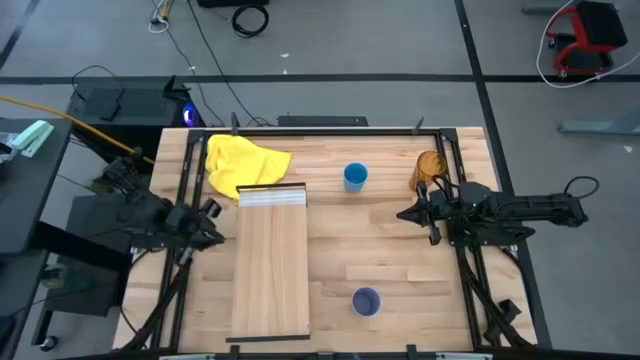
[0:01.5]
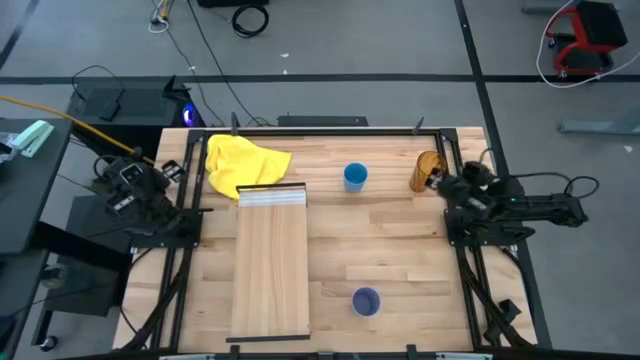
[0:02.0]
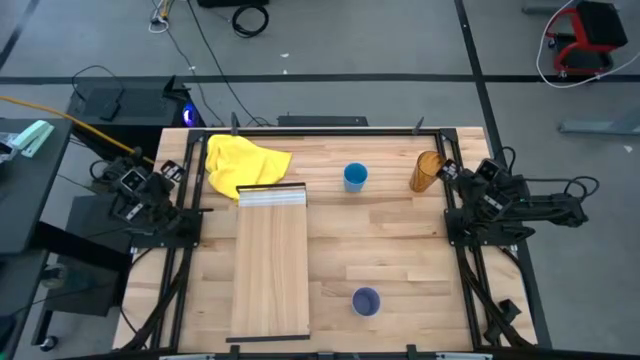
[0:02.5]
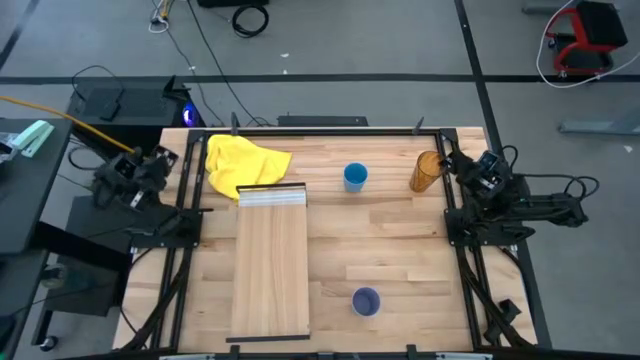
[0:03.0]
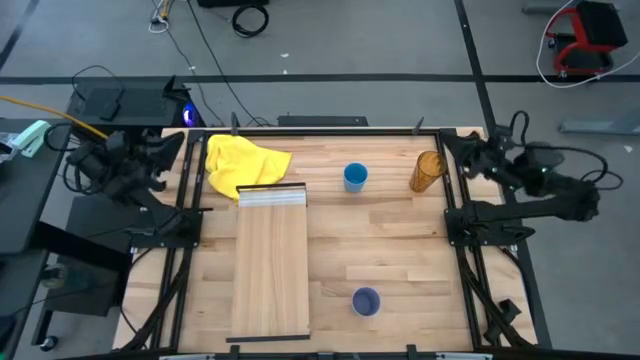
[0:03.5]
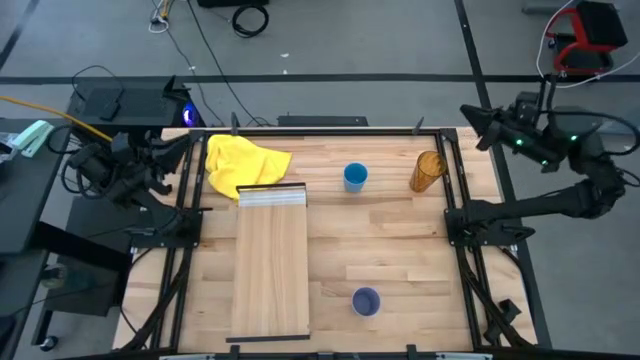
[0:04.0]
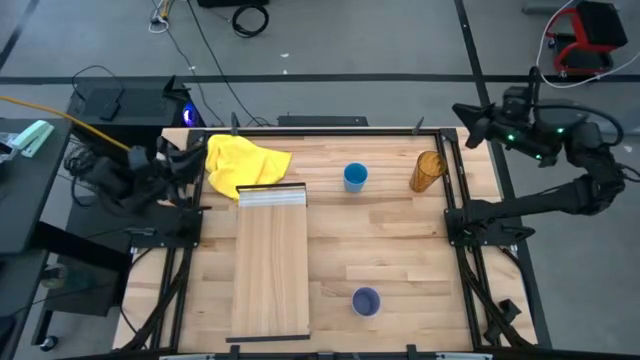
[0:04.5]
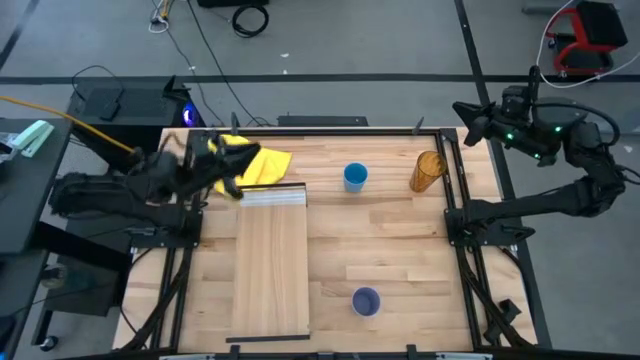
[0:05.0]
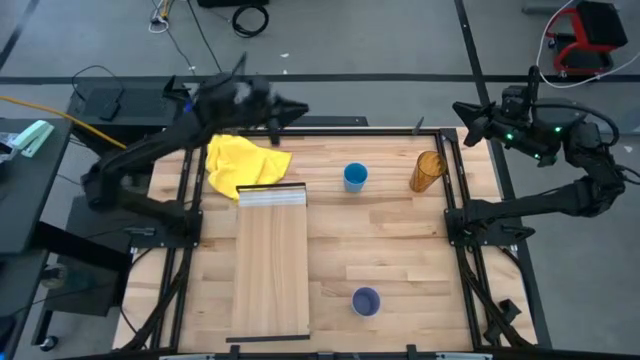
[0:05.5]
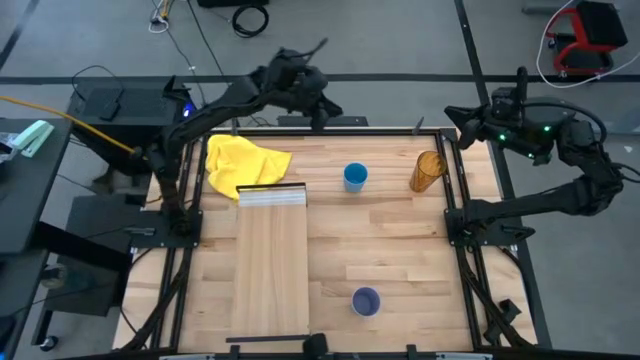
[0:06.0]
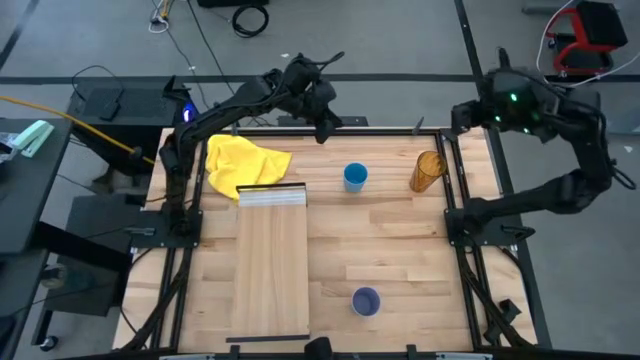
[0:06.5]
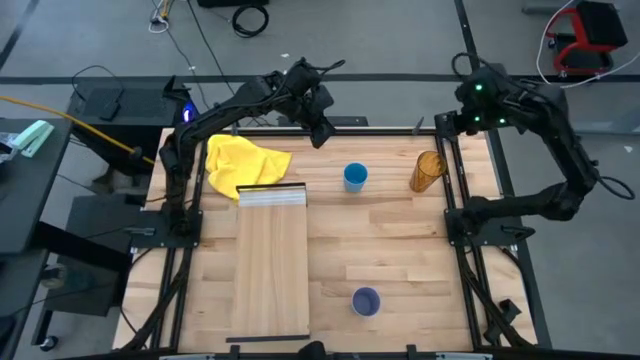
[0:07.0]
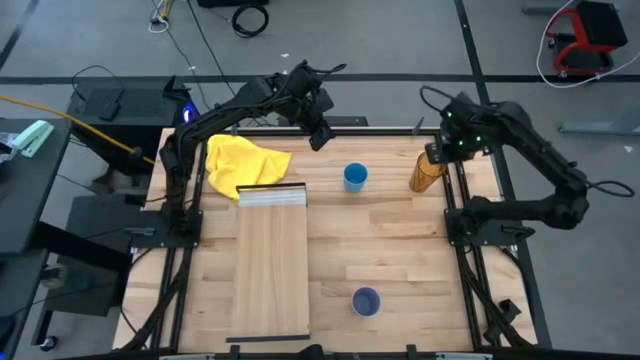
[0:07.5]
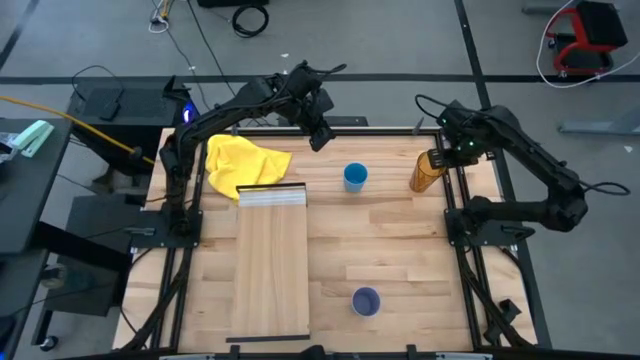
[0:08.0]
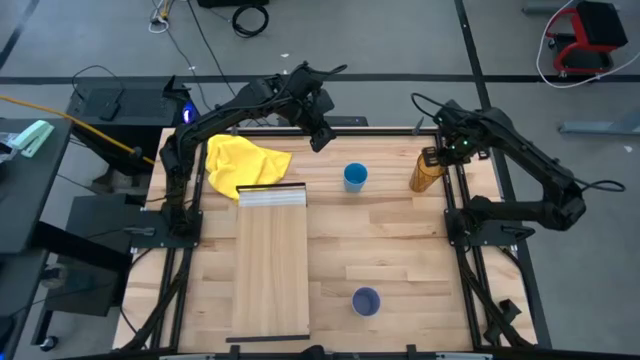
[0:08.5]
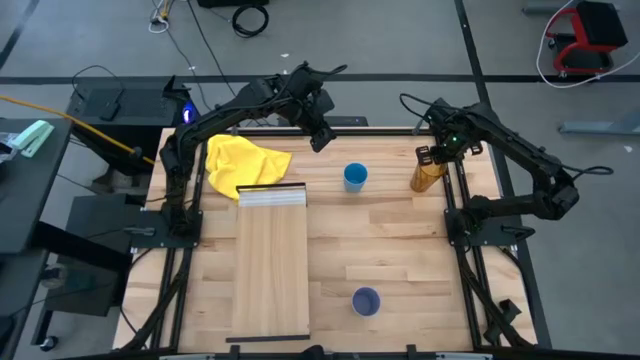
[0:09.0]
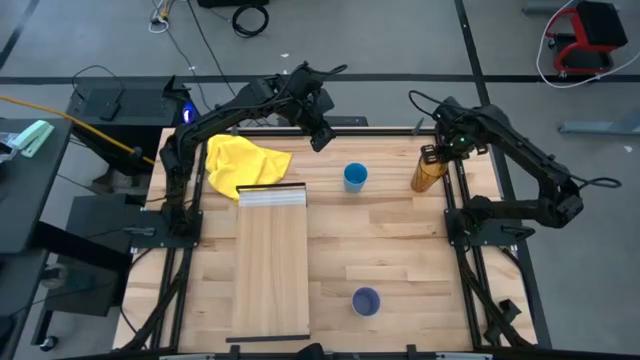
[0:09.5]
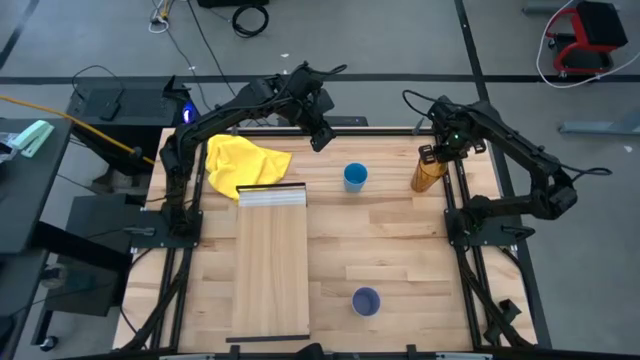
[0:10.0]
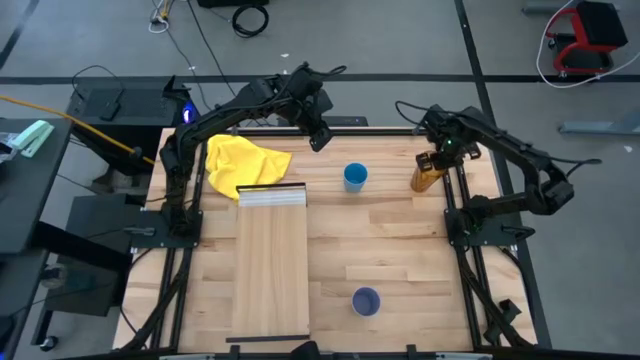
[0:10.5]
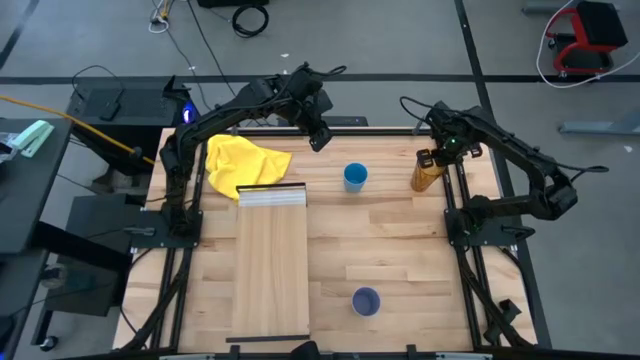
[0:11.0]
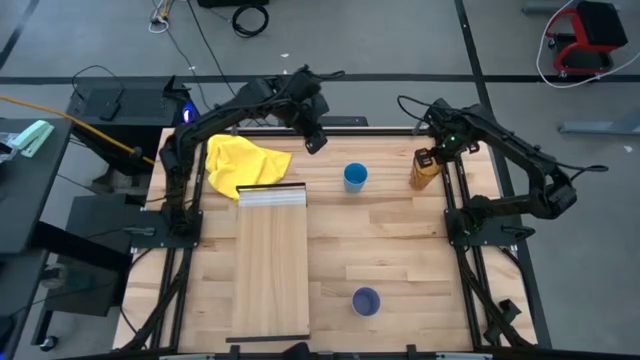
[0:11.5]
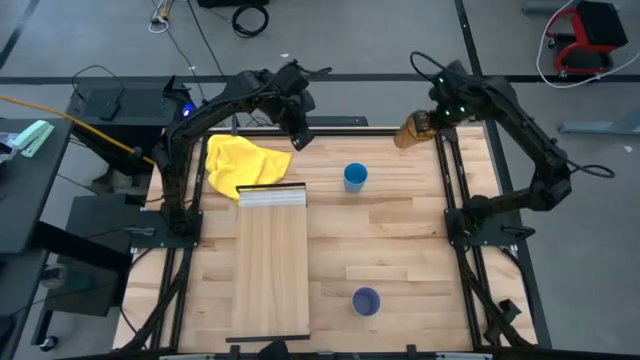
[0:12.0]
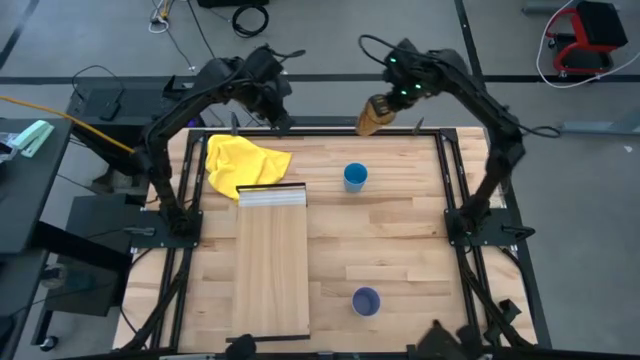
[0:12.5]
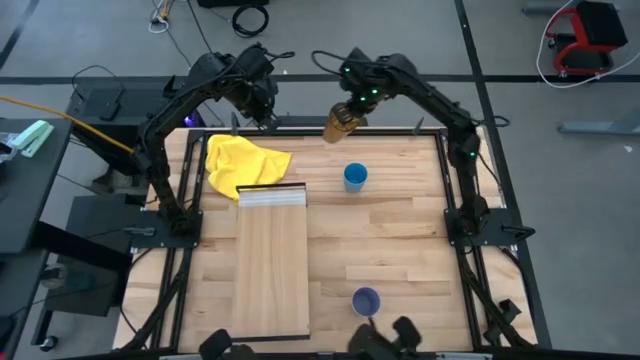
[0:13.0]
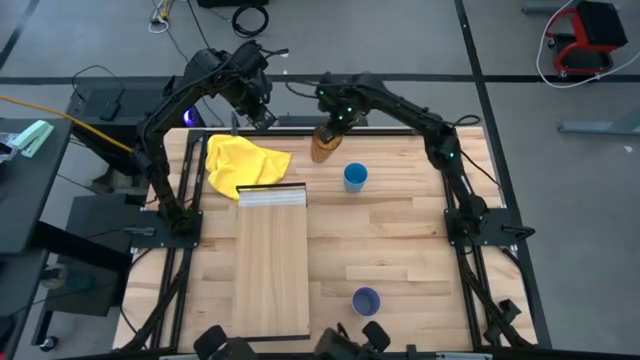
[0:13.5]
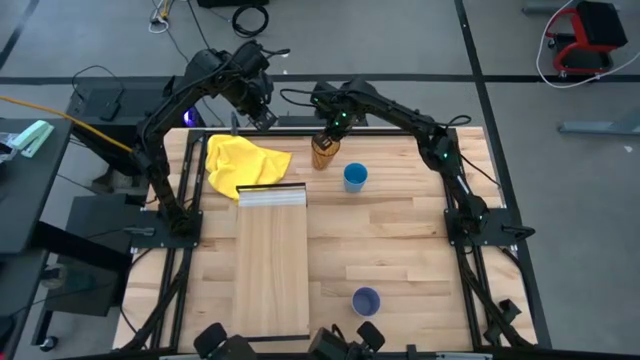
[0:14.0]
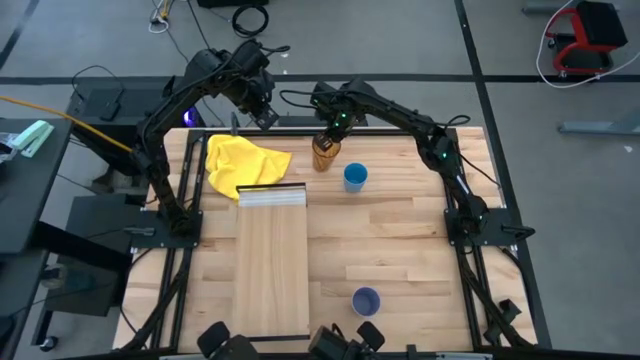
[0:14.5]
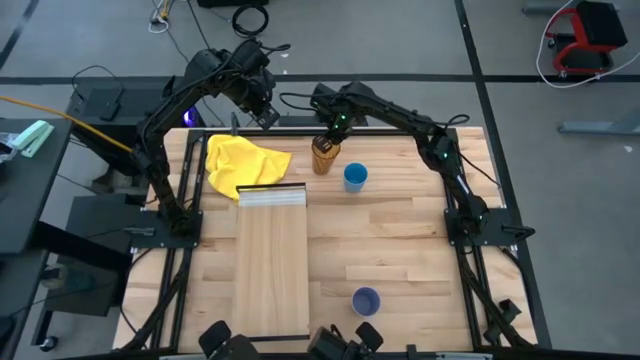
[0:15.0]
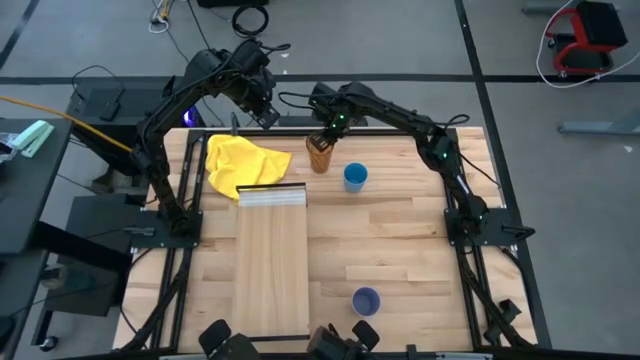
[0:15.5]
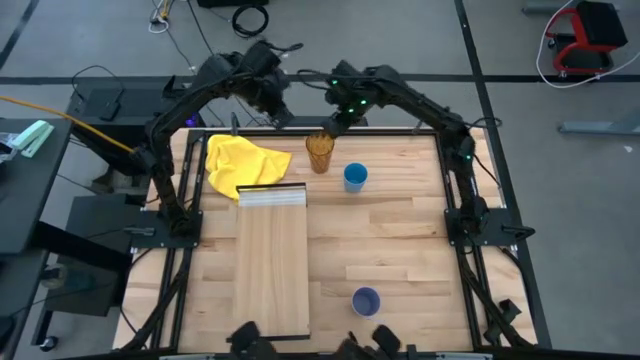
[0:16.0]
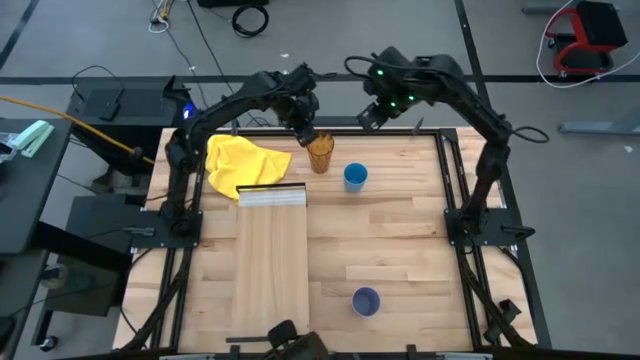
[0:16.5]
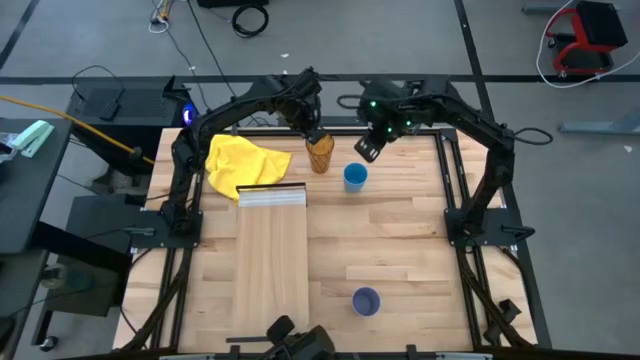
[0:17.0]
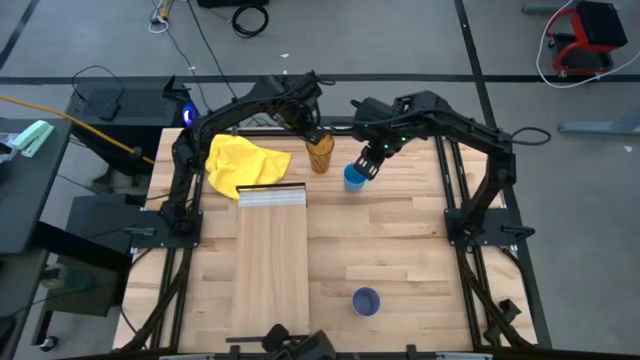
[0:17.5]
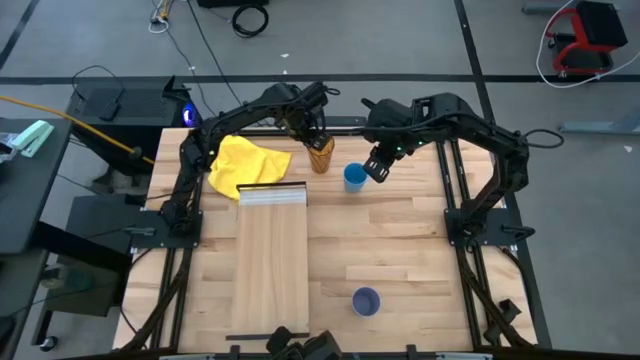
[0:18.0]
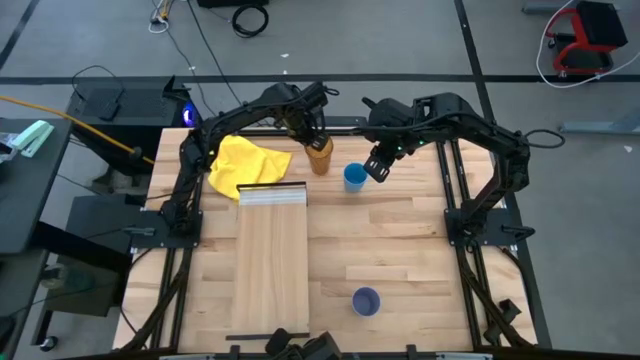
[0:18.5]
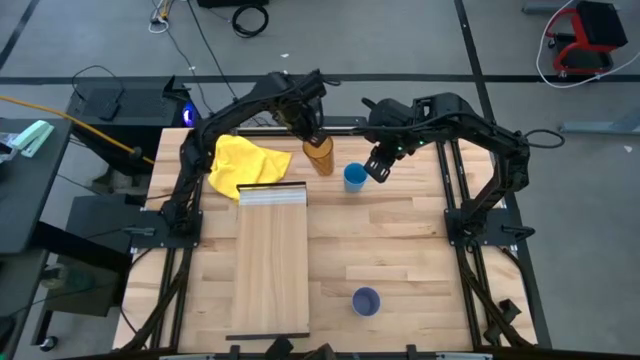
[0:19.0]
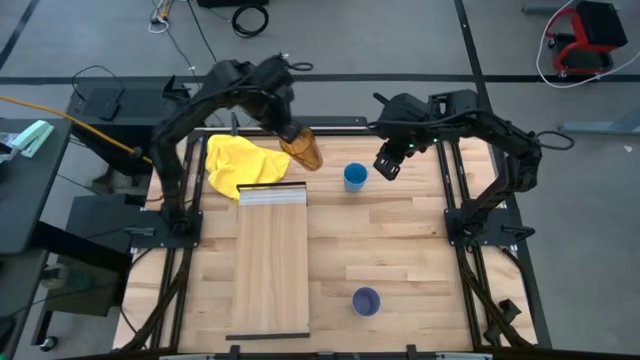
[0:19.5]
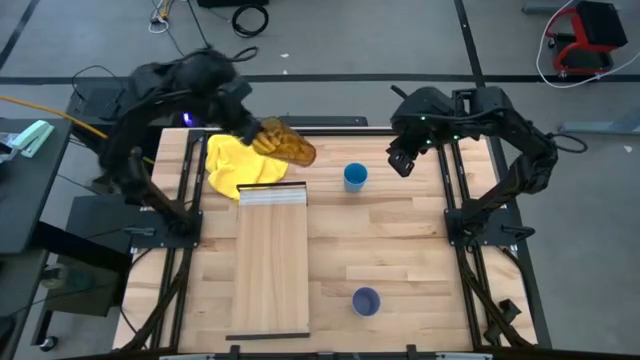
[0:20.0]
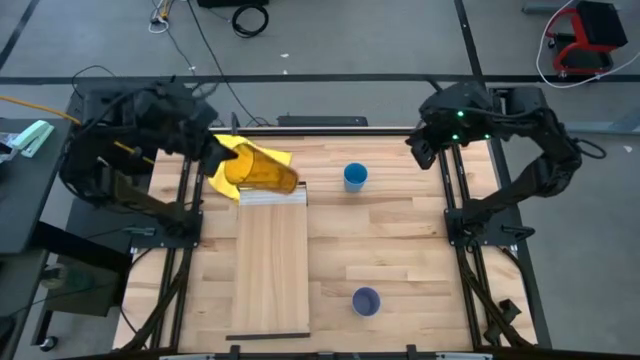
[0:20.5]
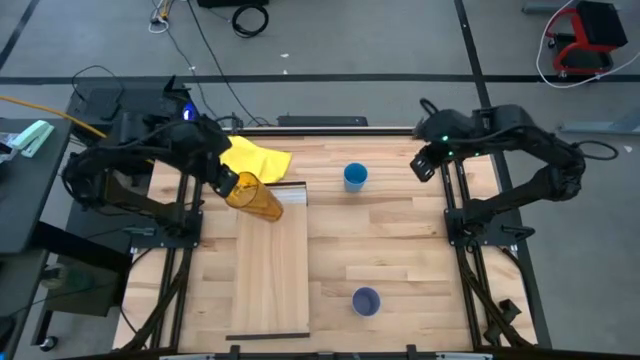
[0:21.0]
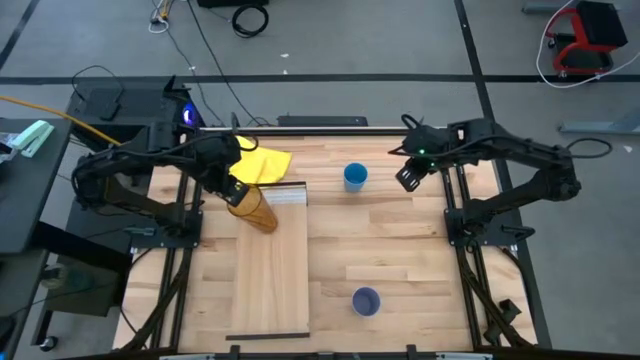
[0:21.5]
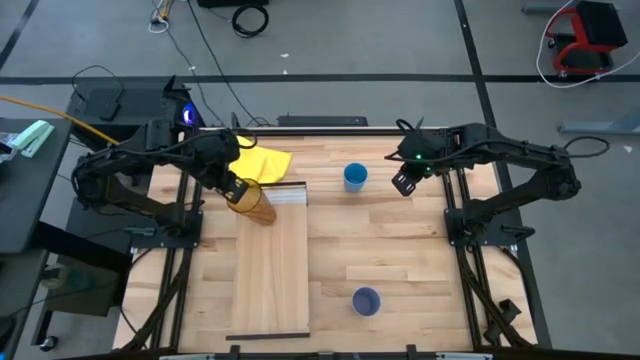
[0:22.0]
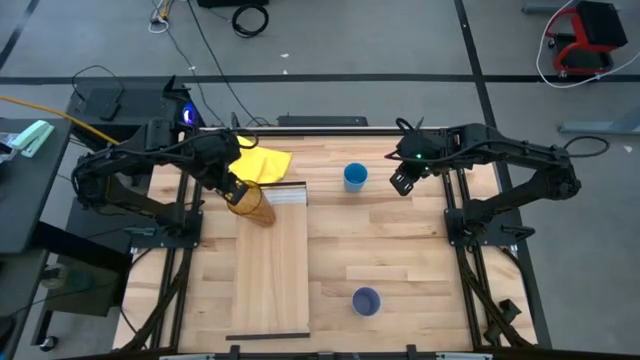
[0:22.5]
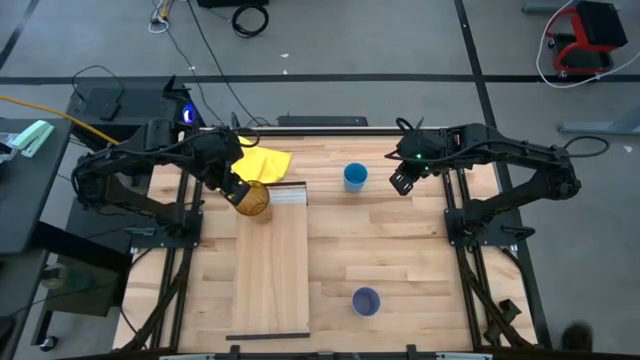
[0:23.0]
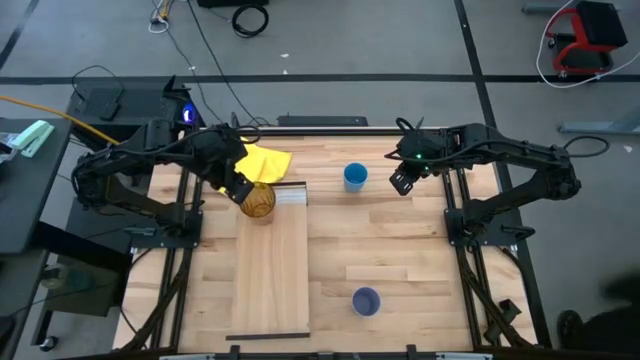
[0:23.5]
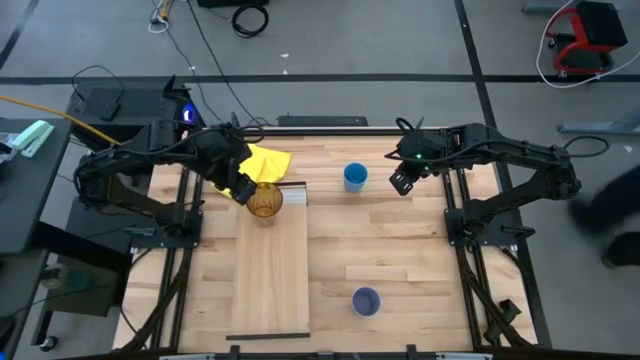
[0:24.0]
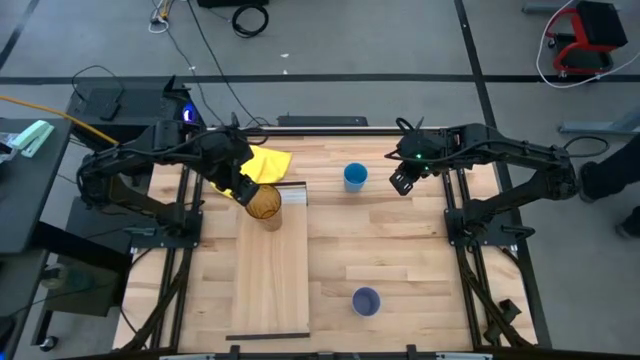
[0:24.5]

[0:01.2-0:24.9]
Task: Stack small to large cups/mugs on shelf
Put the yellow cup on the shelf
